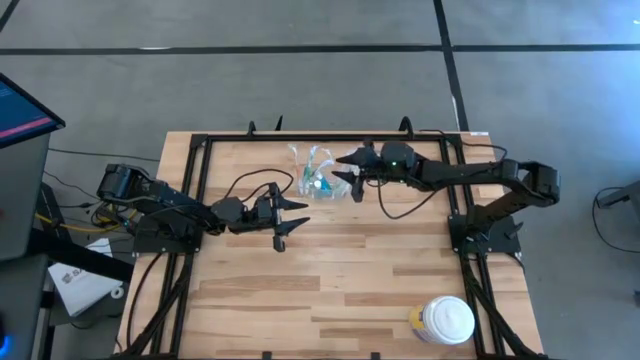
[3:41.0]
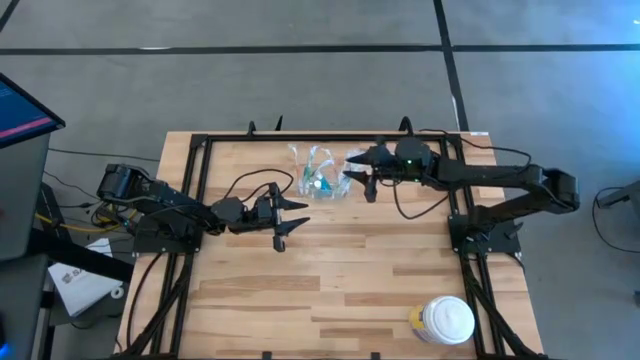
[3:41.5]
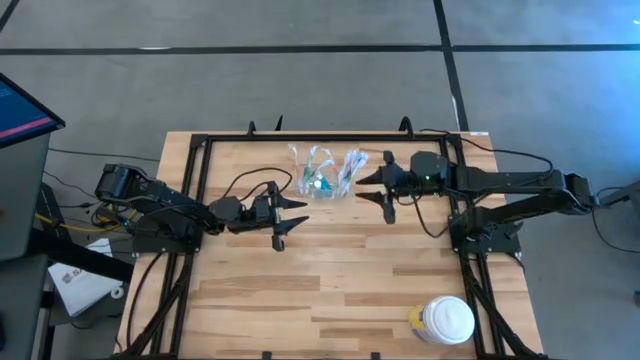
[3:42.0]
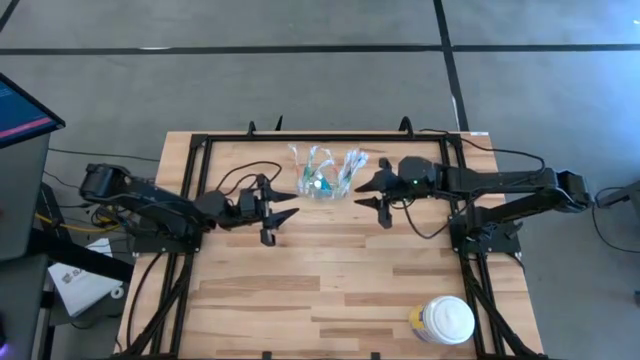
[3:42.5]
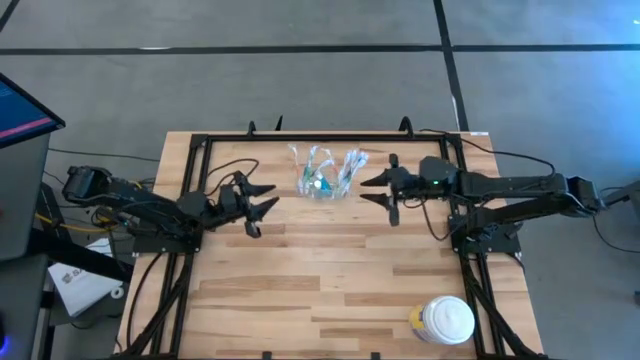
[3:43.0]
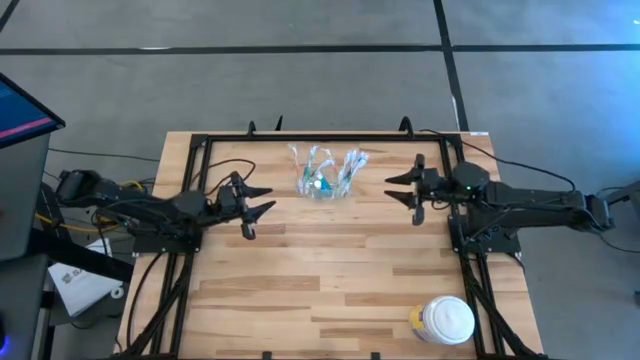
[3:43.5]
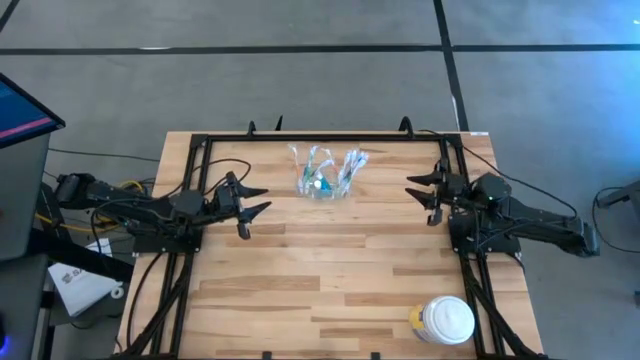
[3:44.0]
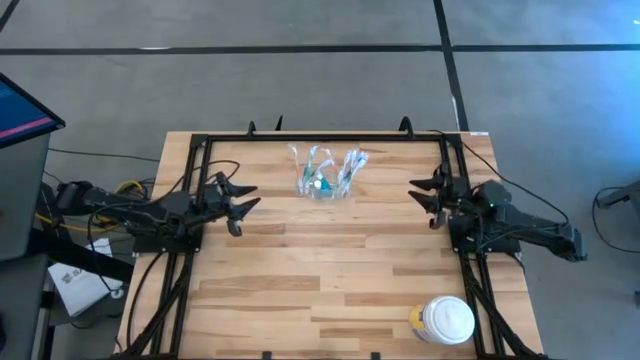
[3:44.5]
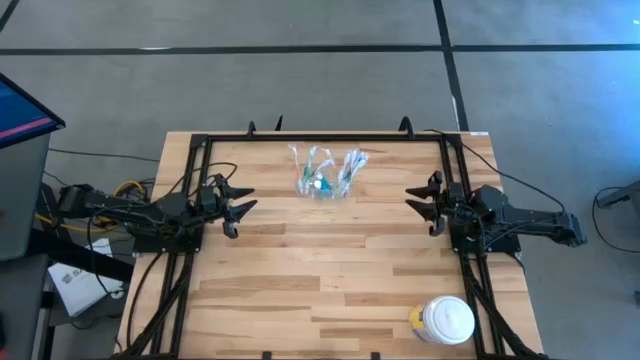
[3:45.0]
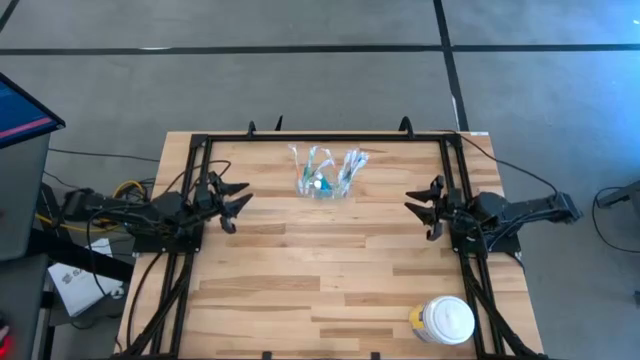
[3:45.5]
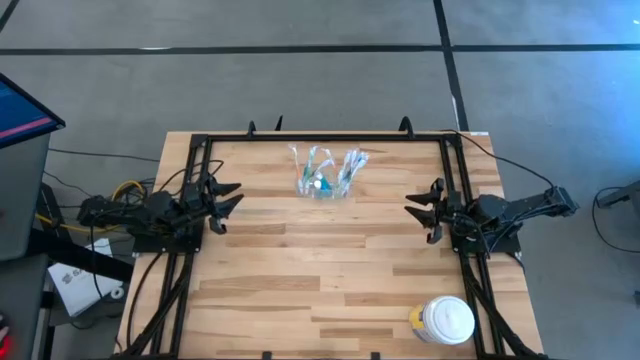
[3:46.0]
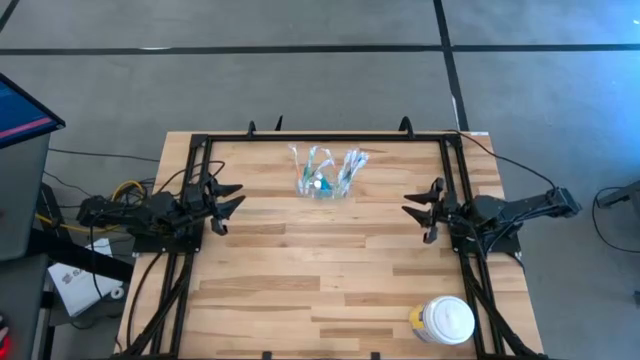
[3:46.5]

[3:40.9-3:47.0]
Task: Pick & Place toothbrushing station
Return to Home Position

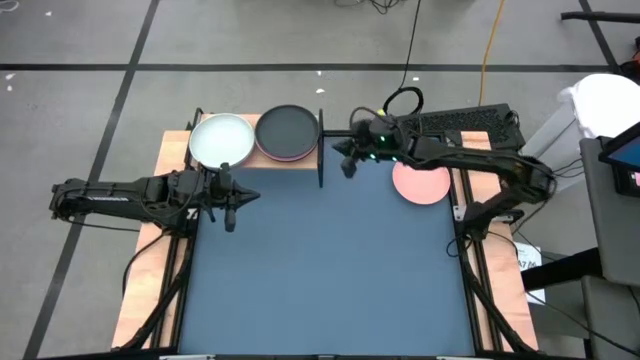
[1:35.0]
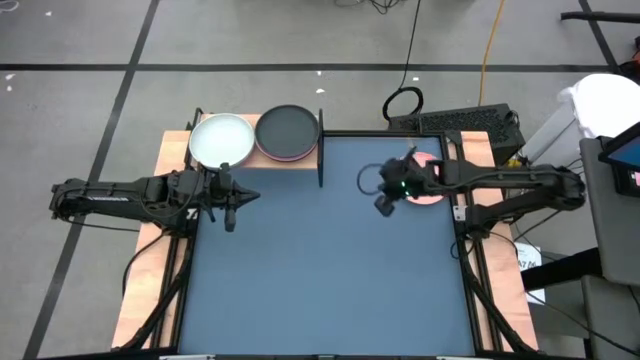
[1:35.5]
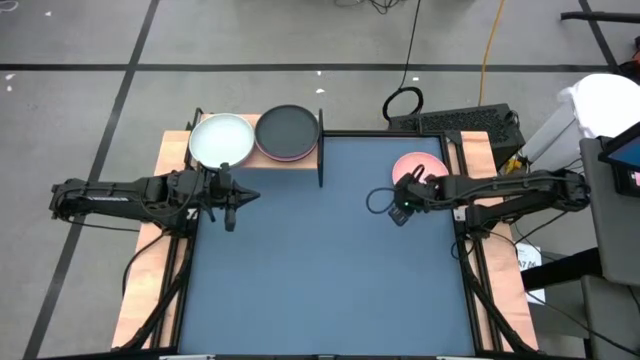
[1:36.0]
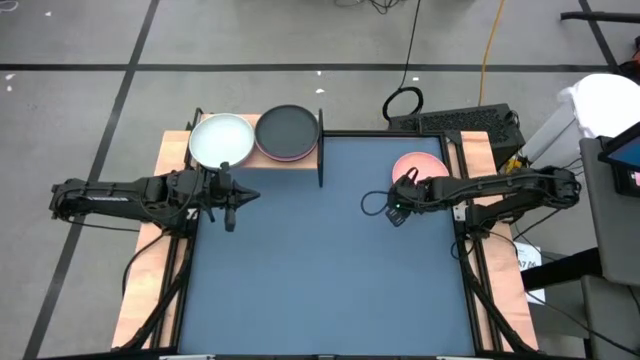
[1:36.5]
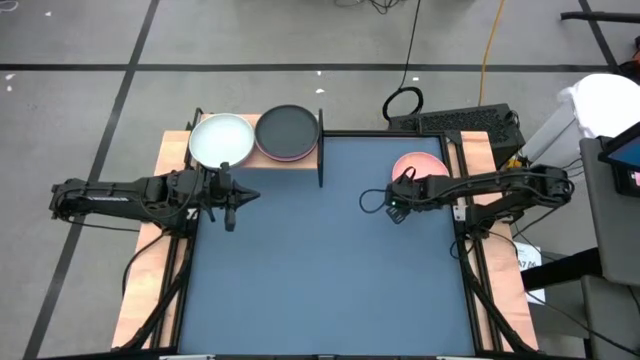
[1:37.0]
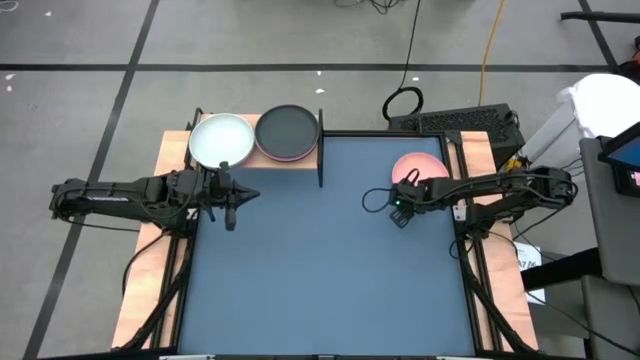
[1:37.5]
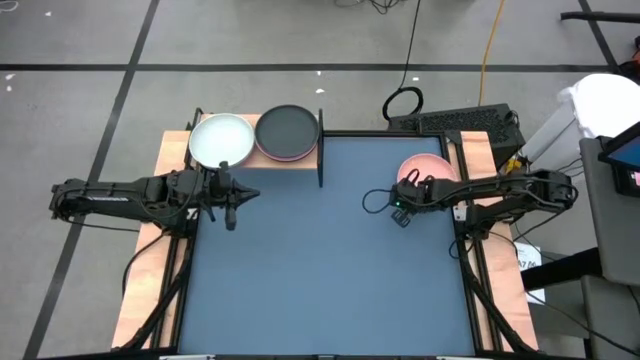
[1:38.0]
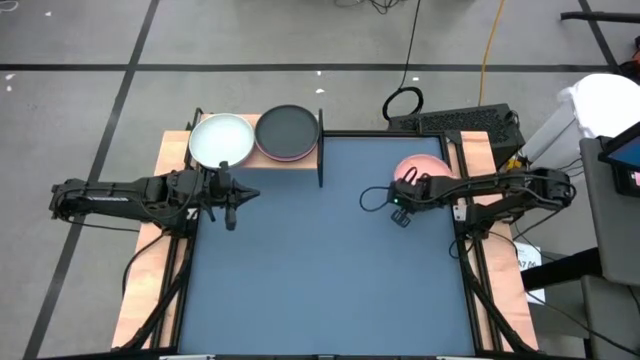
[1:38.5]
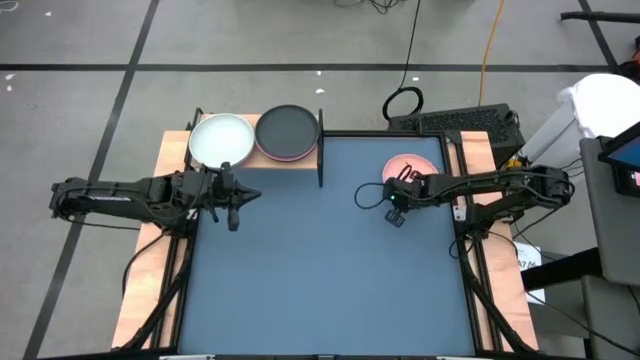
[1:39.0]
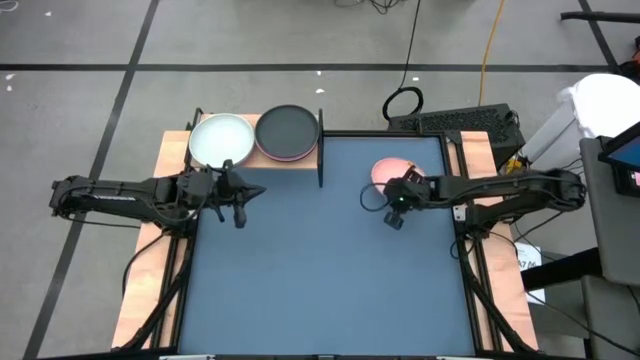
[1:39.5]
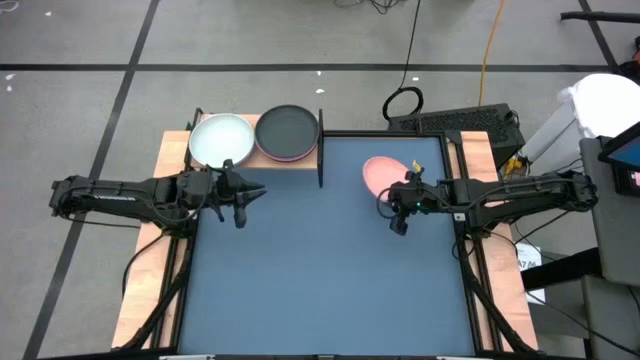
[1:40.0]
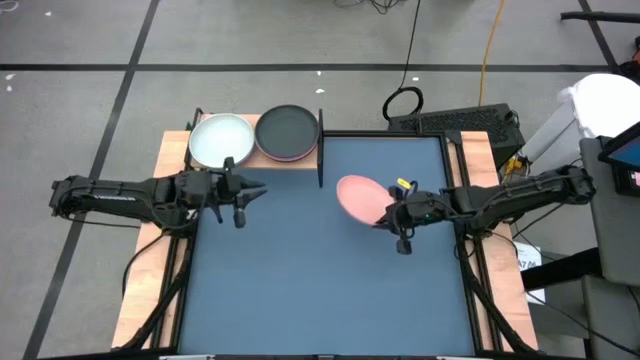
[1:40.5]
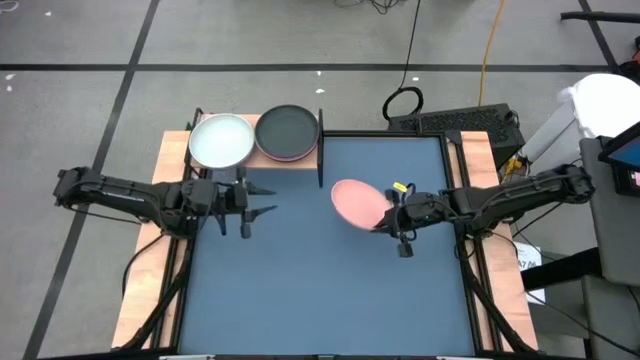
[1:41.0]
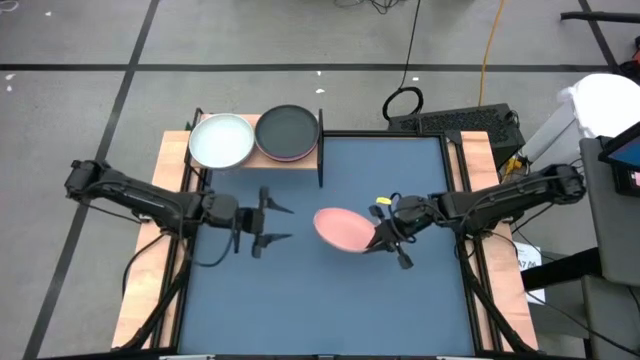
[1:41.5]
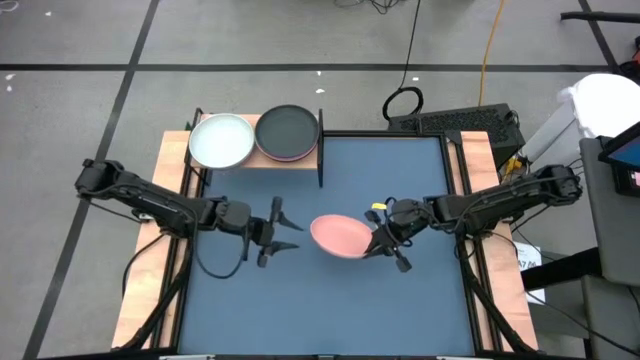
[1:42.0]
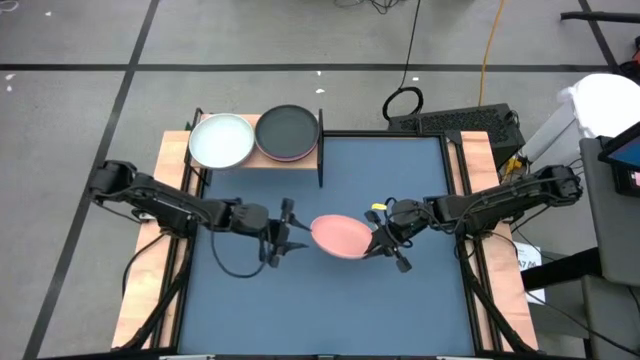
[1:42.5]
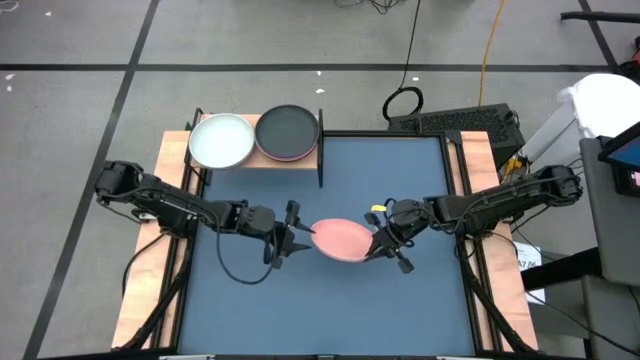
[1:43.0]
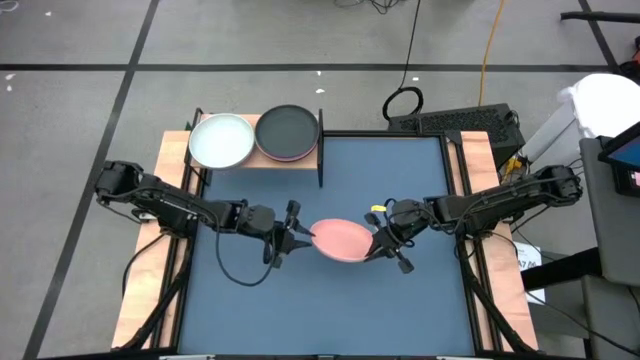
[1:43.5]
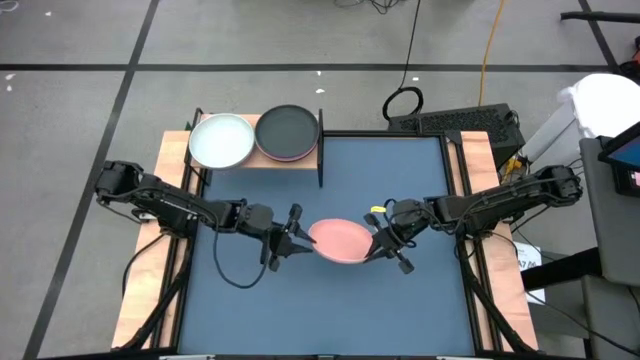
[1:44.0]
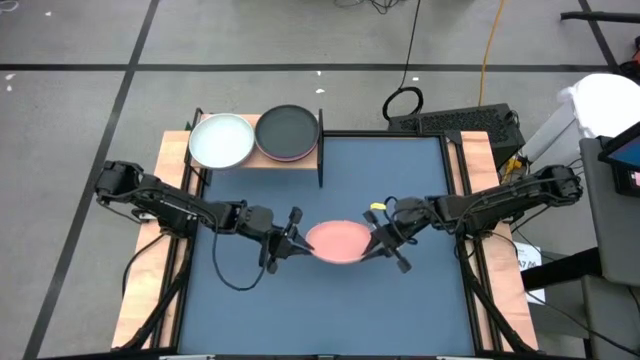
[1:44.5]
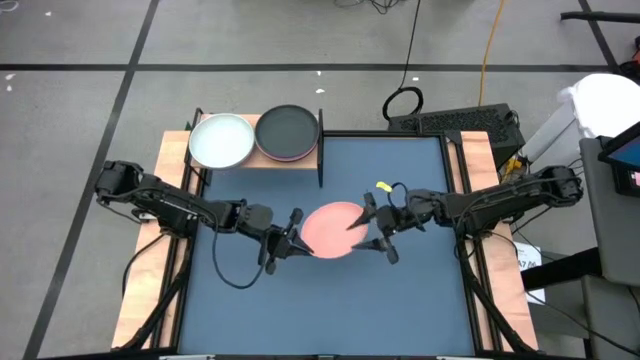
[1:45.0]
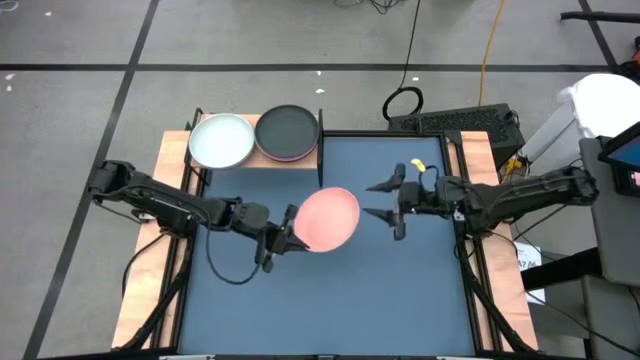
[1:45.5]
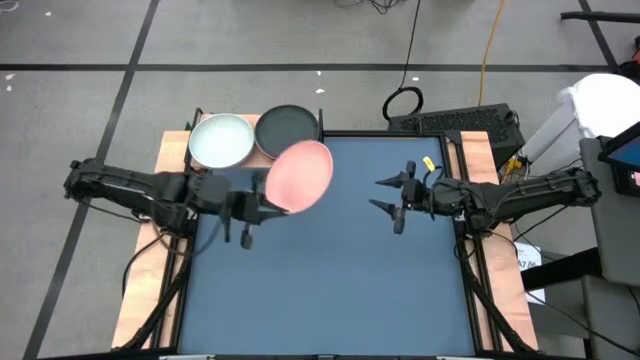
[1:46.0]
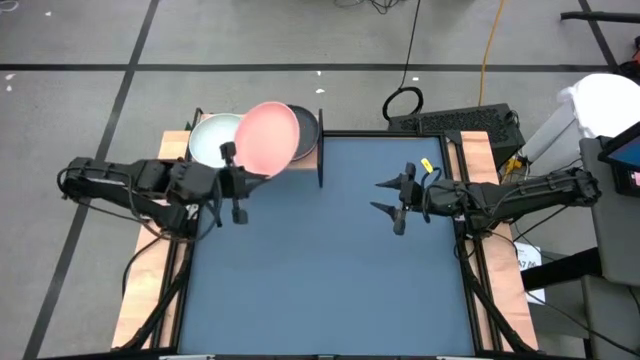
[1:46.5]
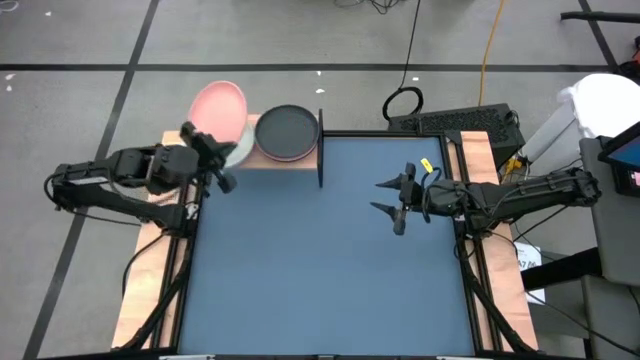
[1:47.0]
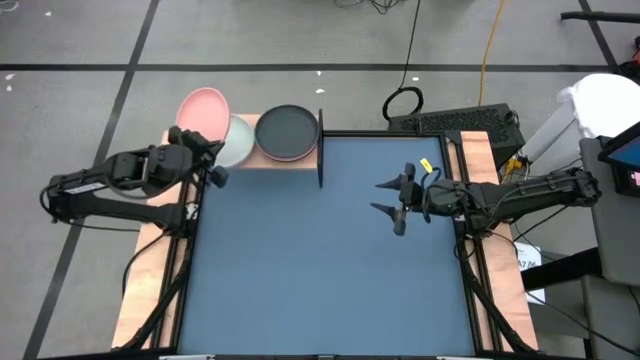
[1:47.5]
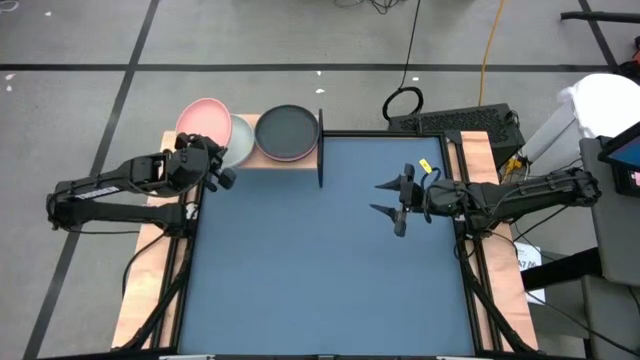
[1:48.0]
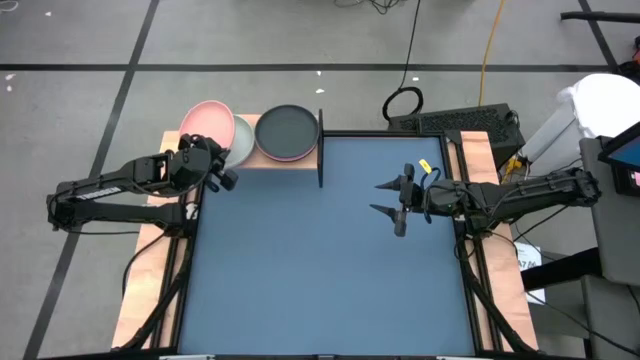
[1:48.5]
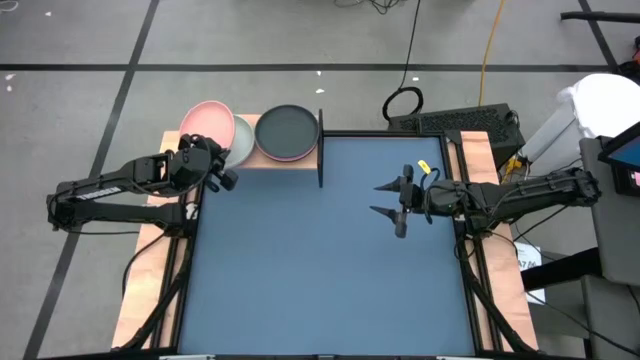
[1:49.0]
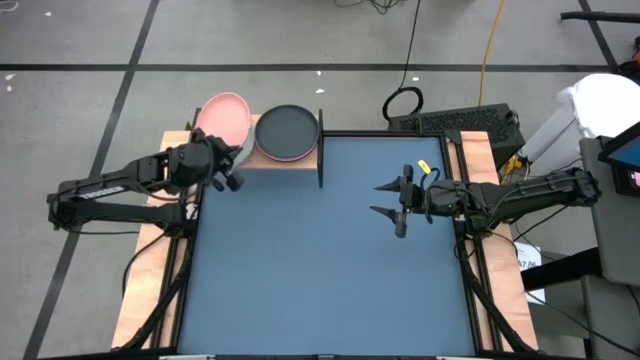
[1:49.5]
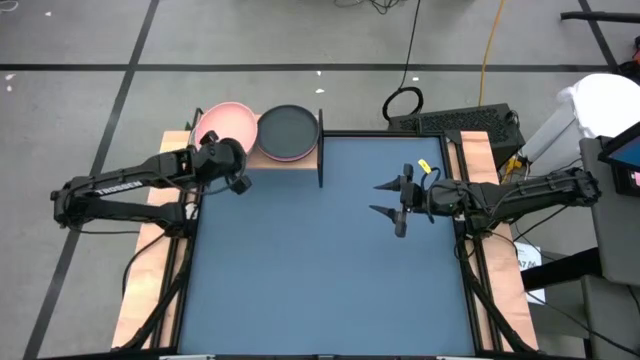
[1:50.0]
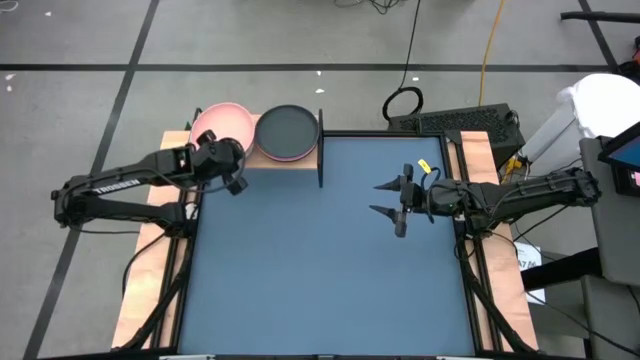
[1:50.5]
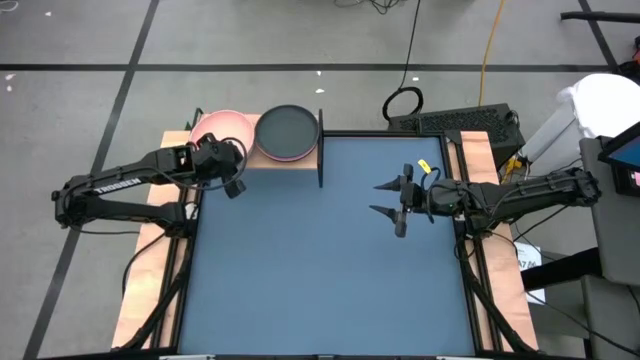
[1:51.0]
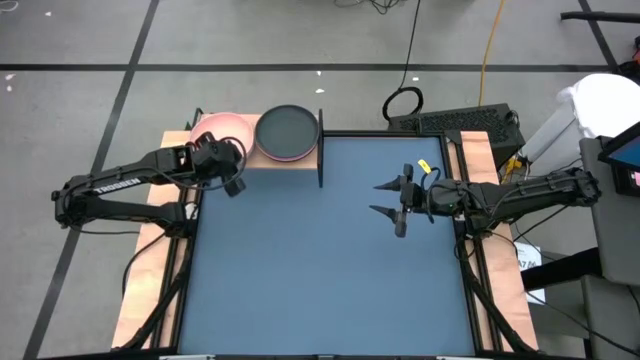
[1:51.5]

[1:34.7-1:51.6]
Task: Place and stack plates onto a shelf
Stack the light pink plate on the white plate on the shelf
